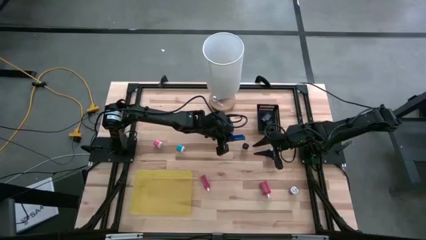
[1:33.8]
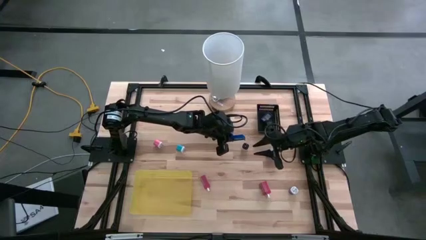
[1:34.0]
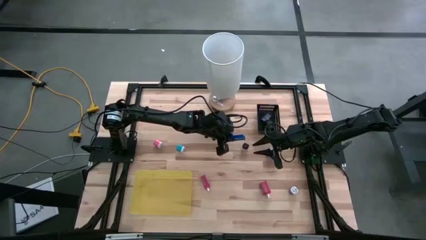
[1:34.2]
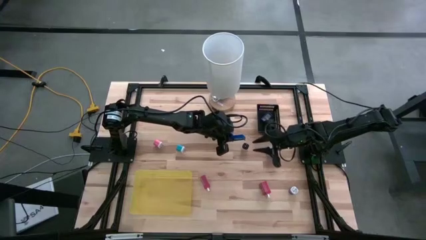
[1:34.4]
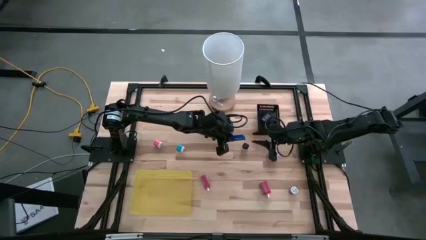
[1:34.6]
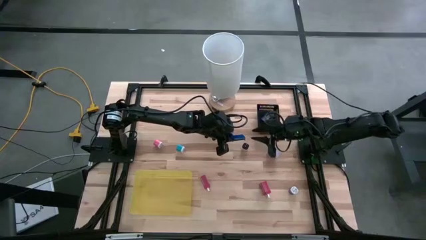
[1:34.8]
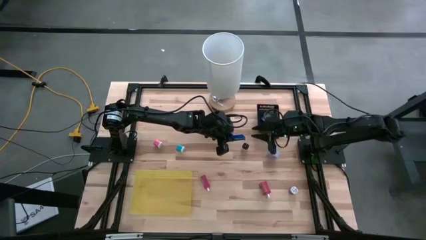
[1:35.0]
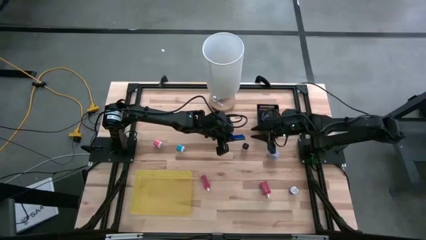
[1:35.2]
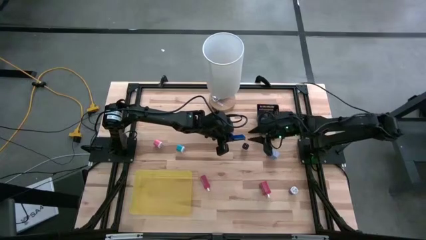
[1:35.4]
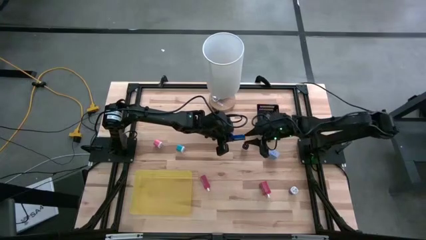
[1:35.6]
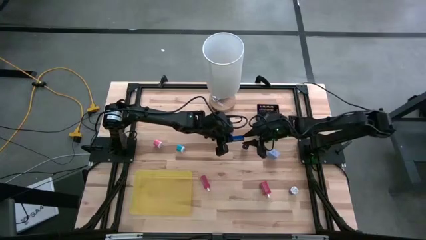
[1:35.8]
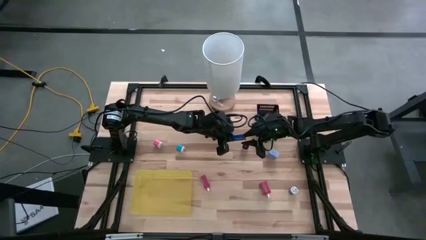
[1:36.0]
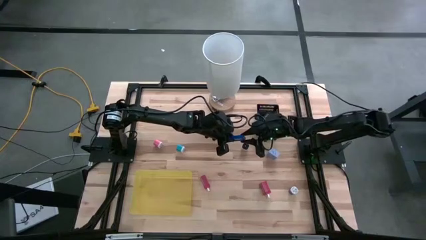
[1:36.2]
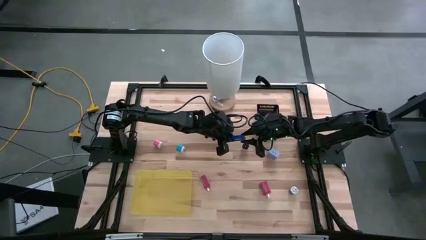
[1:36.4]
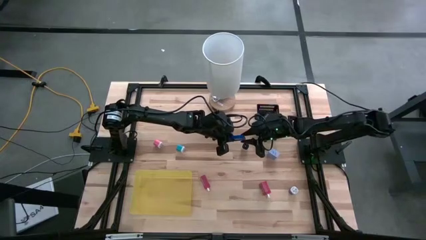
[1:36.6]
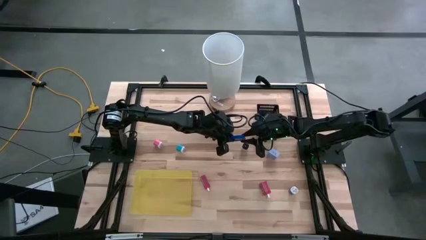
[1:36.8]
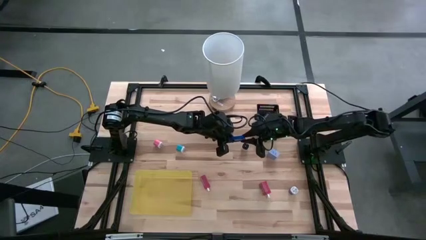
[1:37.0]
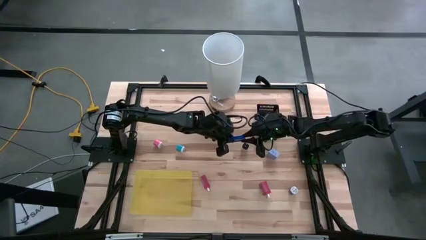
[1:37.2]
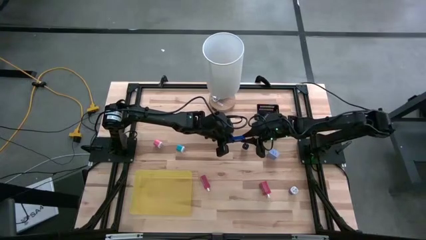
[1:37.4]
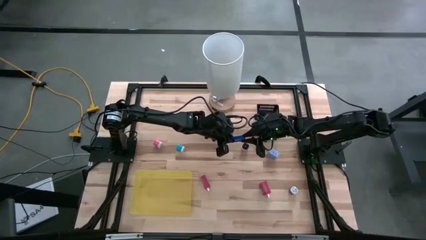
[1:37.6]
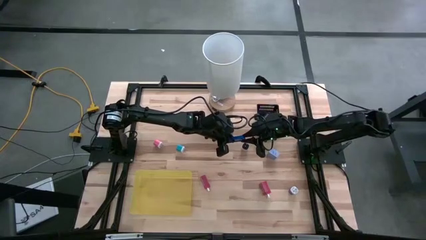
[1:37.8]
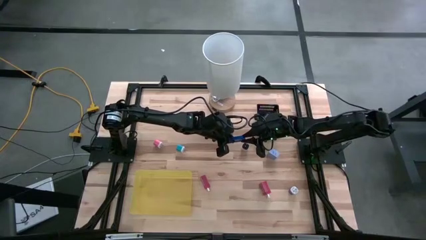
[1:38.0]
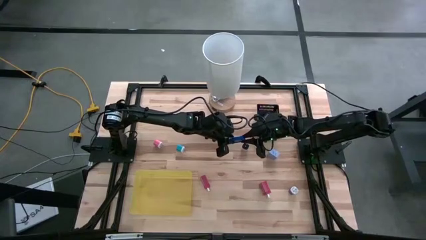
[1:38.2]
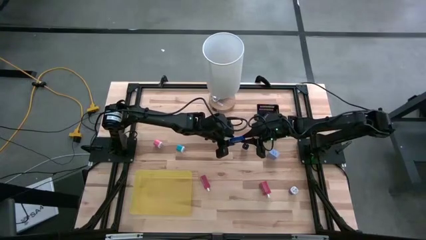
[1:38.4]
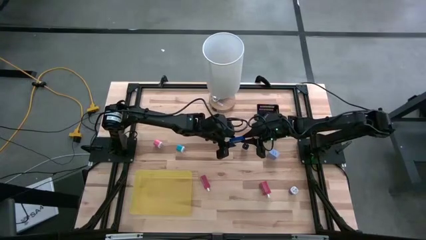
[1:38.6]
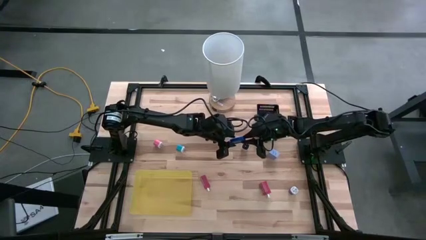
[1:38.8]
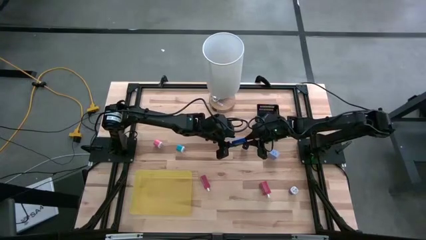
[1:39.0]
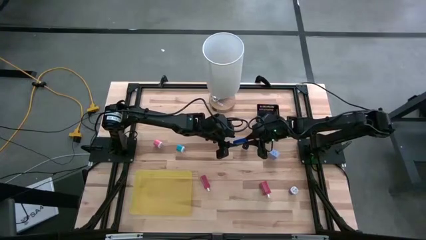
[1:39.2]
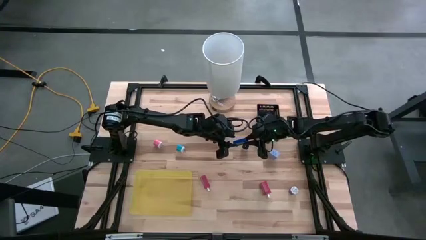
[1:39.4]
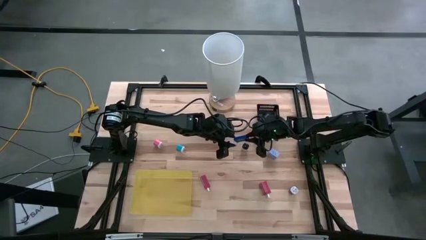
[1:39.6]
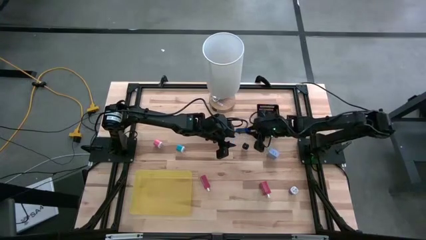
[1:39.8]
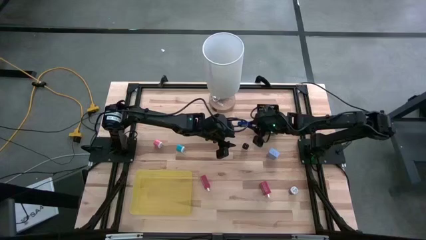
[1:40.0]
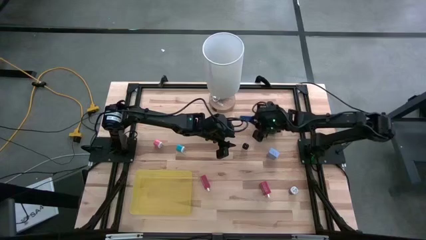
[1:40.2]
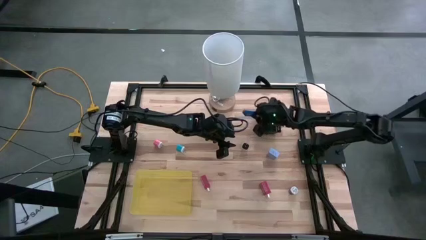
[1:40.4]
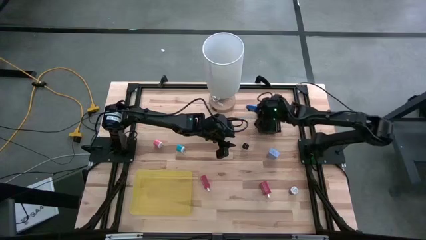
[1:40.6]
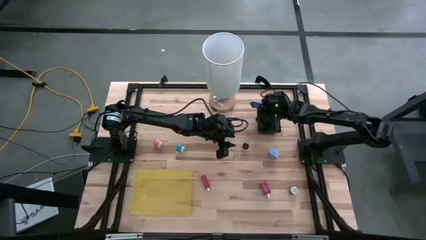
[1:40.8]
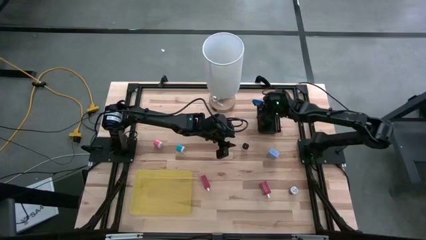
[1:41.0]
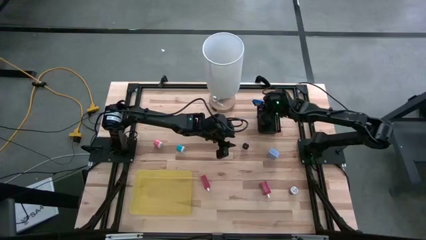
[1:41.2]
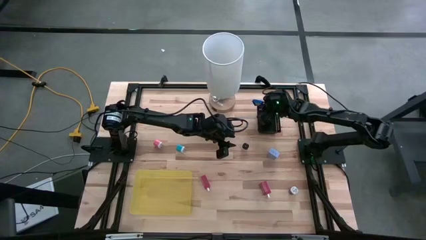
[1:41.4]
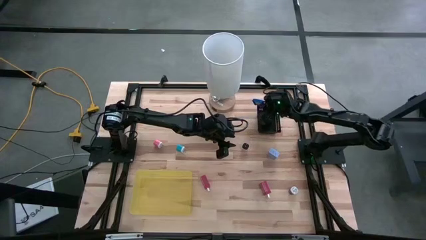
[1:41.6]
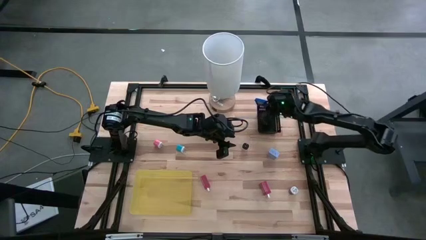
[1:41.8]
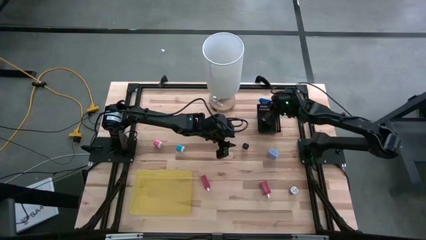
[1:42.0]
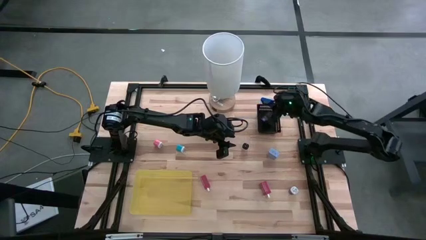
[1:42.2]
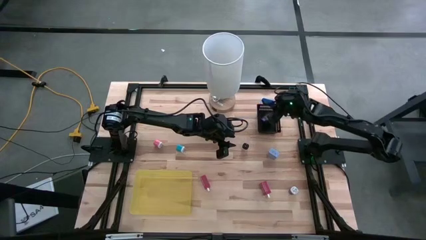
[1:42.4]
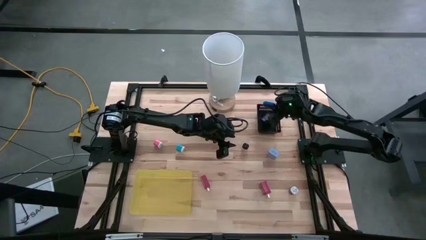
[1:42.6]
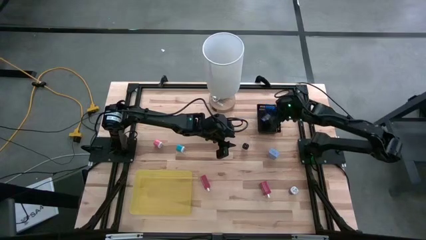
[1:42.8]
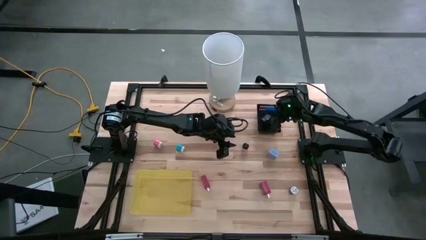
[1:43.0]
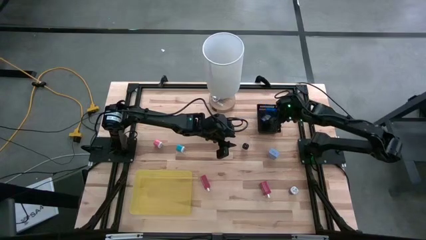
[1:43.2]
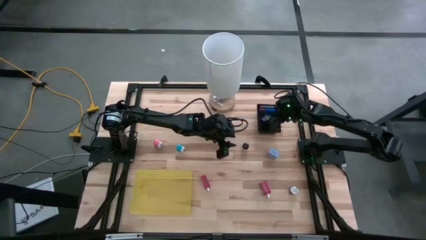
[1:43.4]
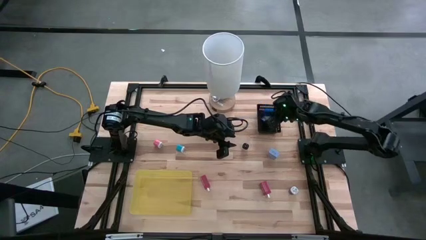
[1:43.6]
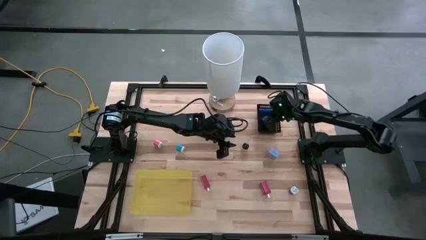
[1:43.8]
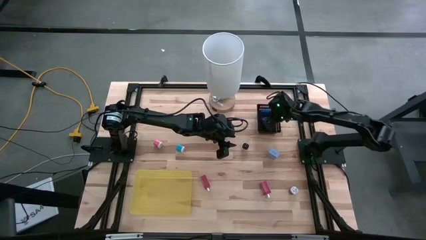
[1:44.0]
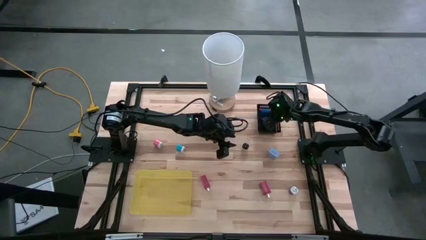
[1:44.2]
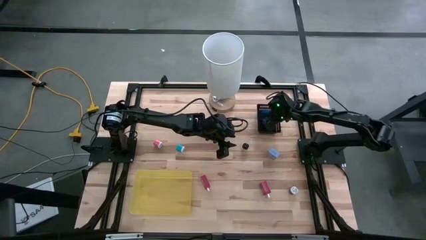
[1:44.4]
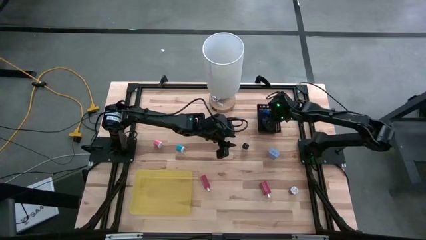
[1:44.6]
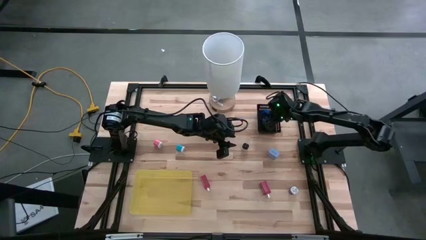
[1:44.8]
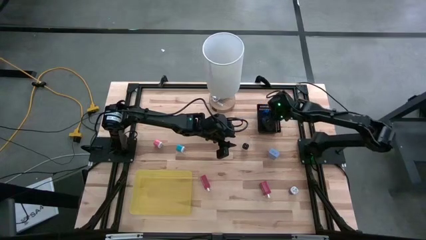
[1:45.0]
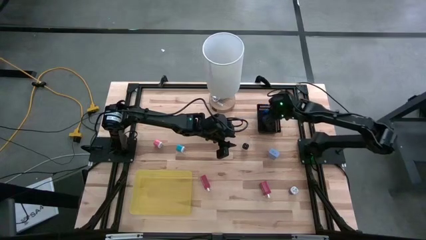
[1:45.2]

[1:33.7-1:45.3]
Task: Pick & Place Office items
Put the bottom blue digital clock into the black bin
